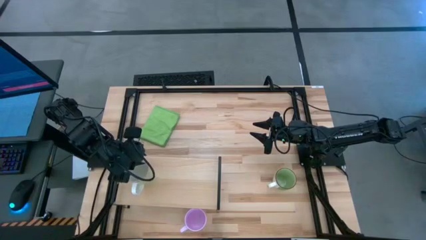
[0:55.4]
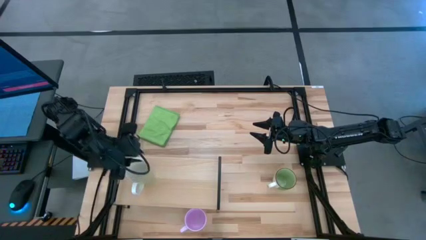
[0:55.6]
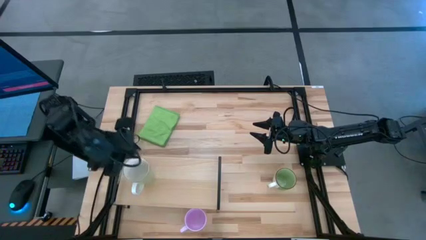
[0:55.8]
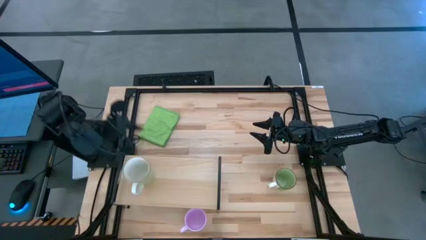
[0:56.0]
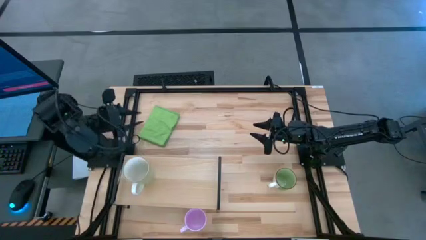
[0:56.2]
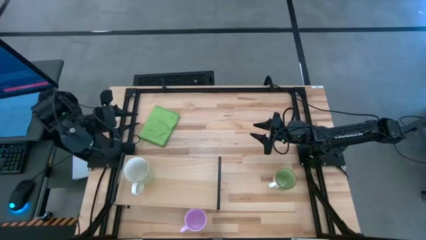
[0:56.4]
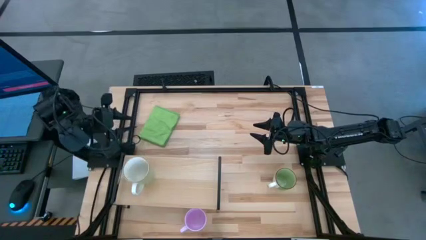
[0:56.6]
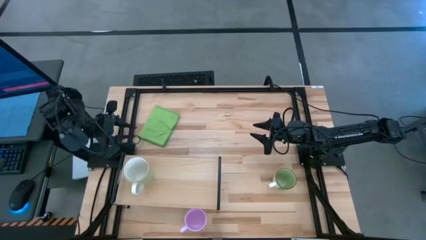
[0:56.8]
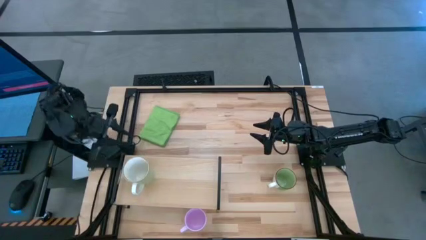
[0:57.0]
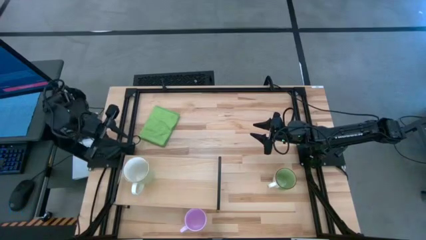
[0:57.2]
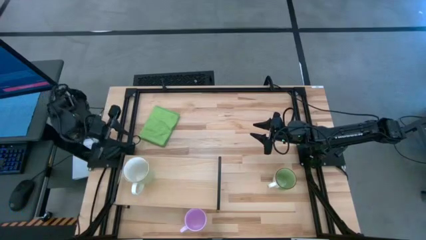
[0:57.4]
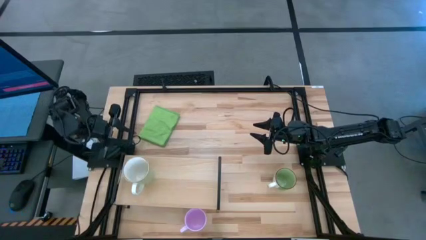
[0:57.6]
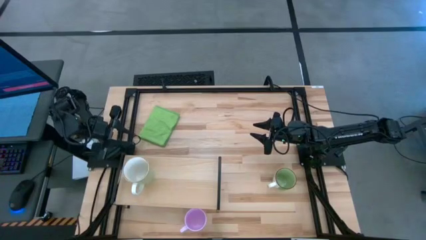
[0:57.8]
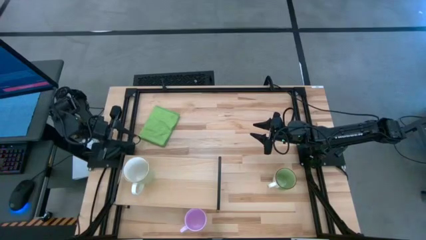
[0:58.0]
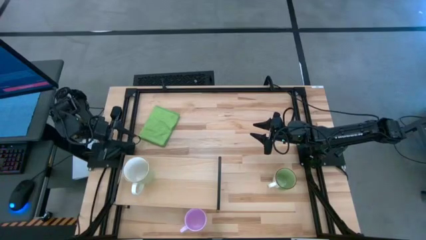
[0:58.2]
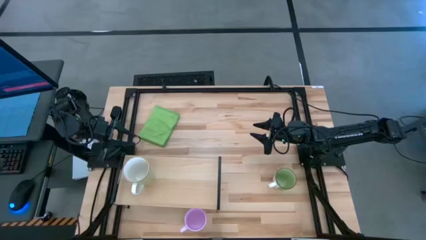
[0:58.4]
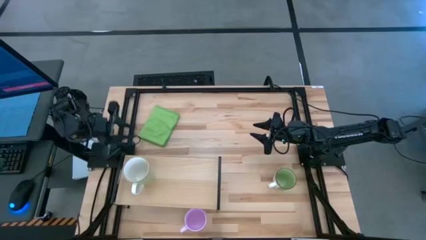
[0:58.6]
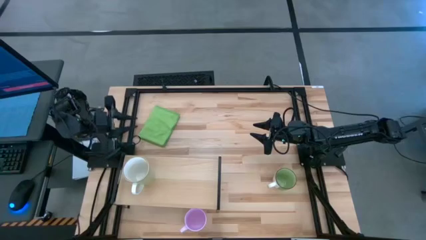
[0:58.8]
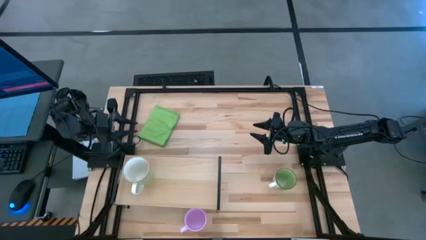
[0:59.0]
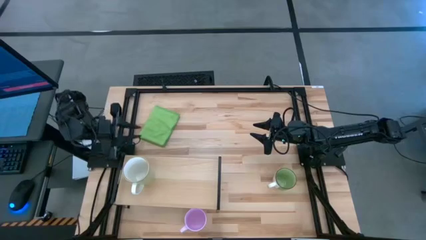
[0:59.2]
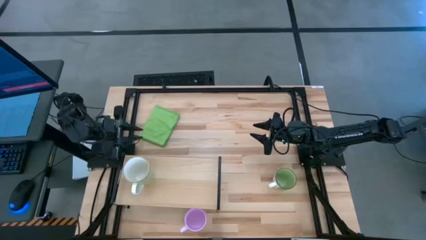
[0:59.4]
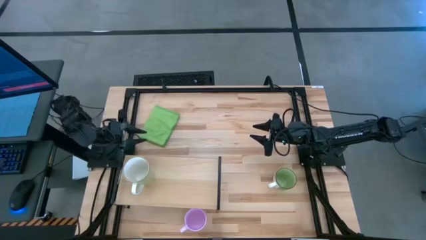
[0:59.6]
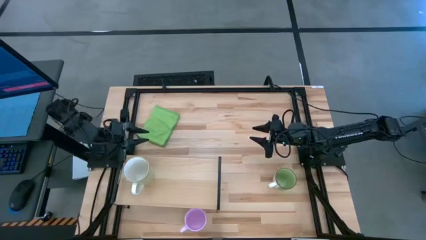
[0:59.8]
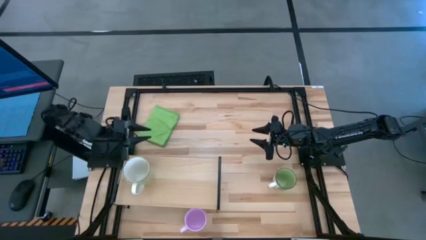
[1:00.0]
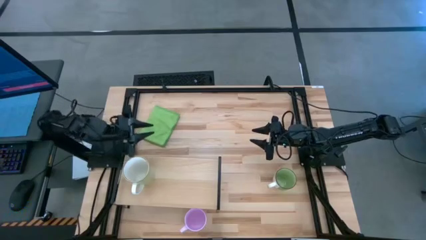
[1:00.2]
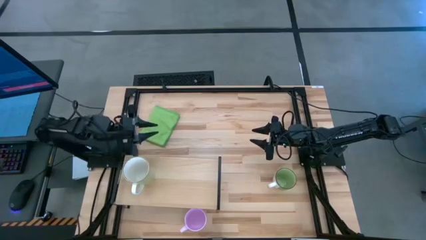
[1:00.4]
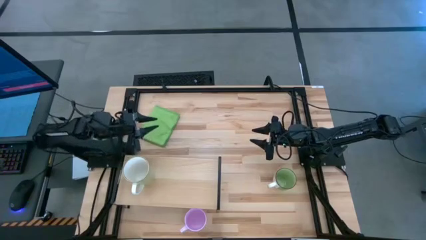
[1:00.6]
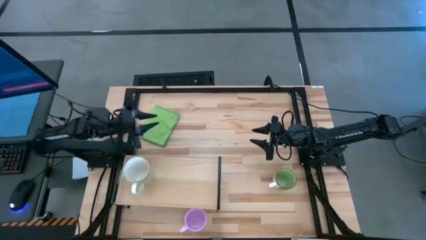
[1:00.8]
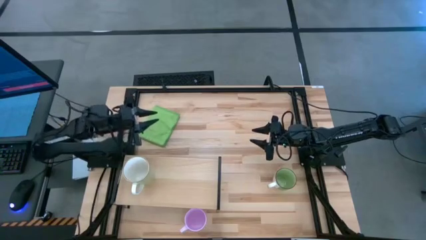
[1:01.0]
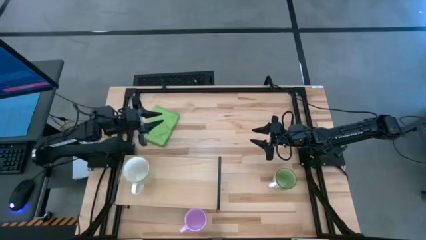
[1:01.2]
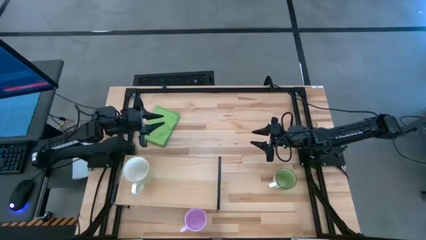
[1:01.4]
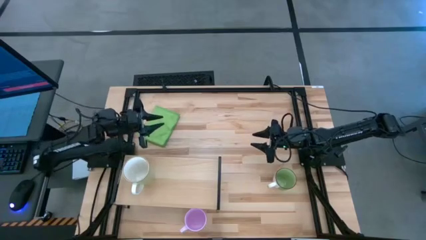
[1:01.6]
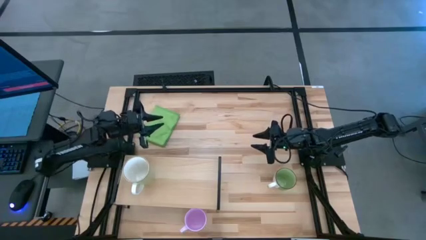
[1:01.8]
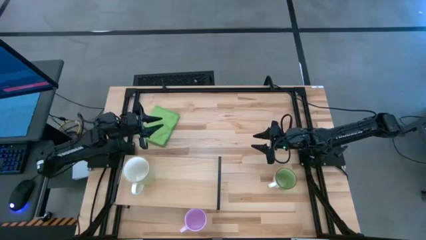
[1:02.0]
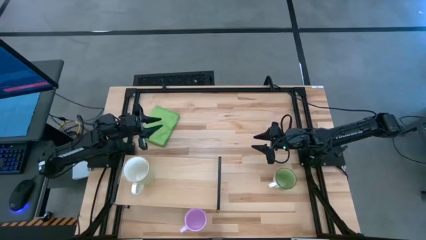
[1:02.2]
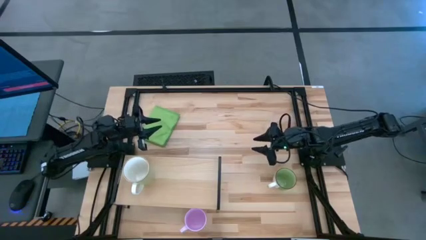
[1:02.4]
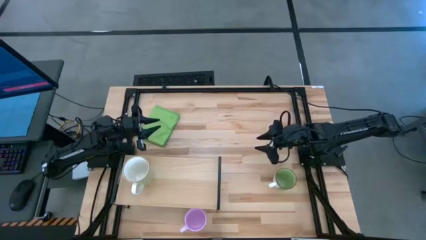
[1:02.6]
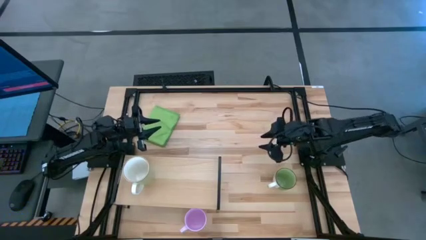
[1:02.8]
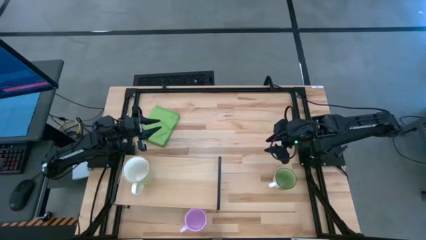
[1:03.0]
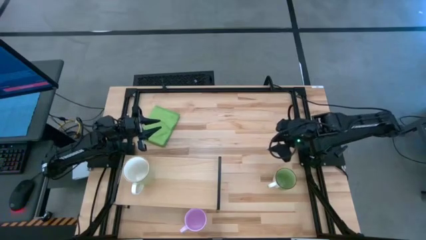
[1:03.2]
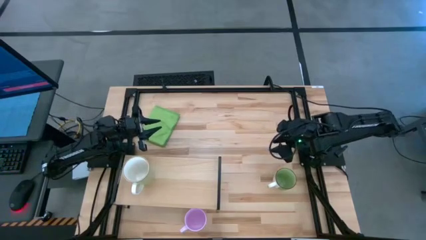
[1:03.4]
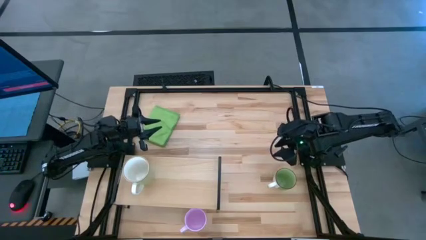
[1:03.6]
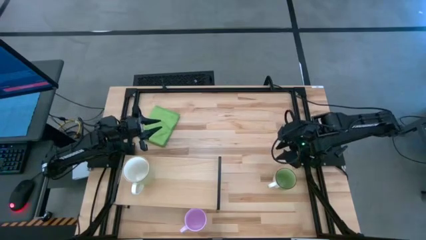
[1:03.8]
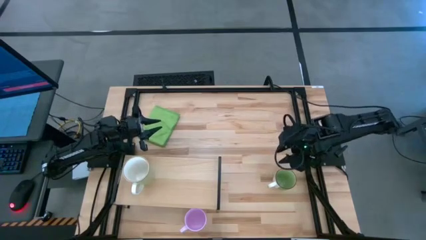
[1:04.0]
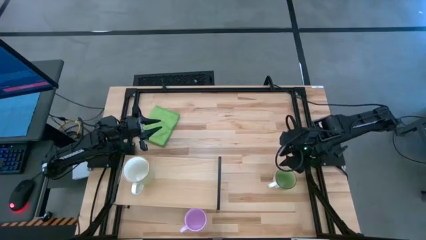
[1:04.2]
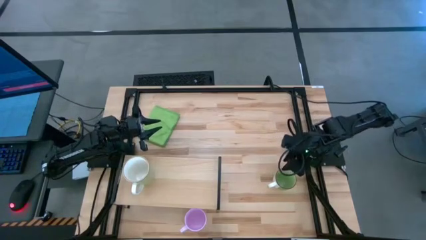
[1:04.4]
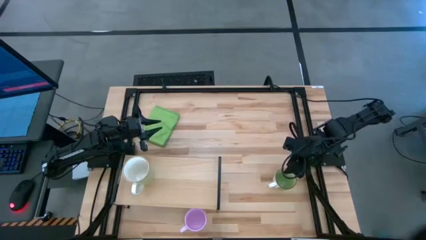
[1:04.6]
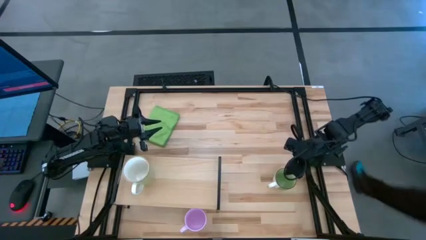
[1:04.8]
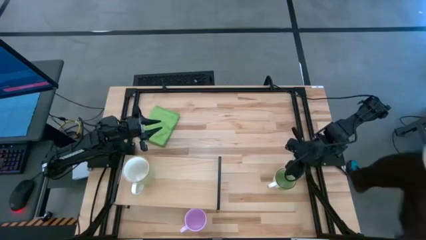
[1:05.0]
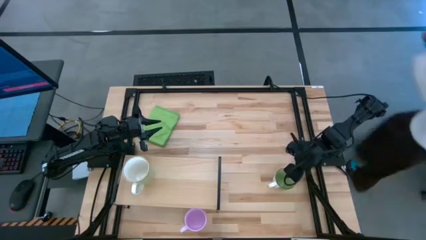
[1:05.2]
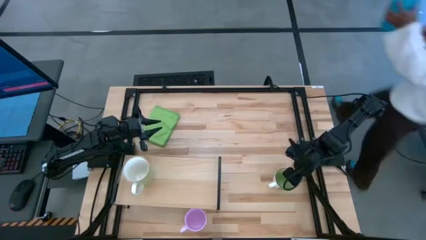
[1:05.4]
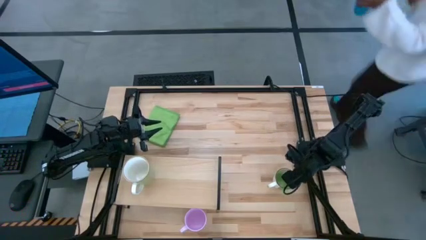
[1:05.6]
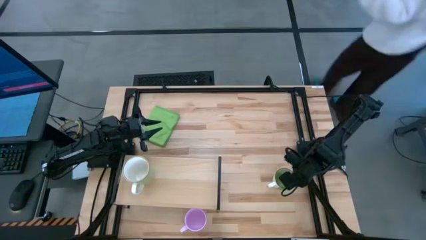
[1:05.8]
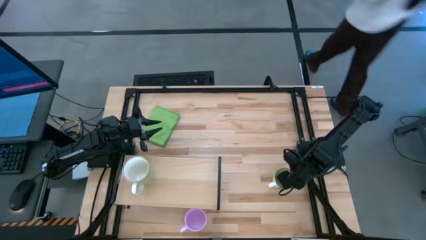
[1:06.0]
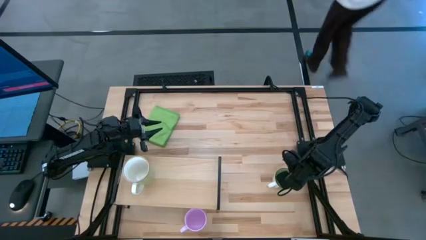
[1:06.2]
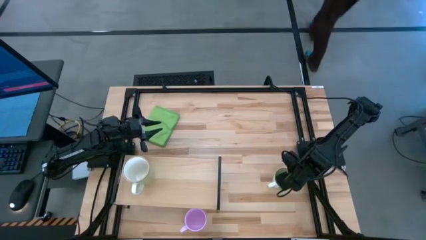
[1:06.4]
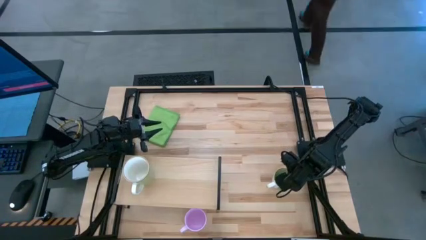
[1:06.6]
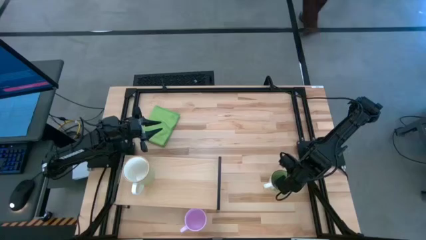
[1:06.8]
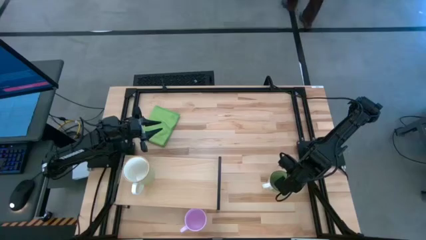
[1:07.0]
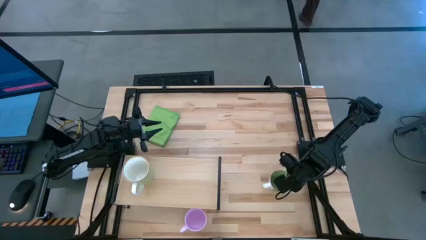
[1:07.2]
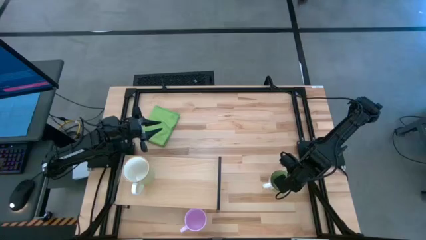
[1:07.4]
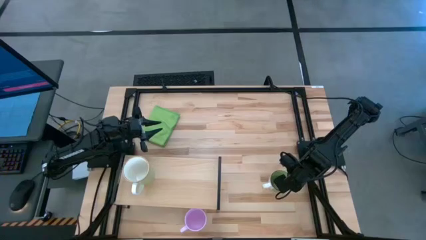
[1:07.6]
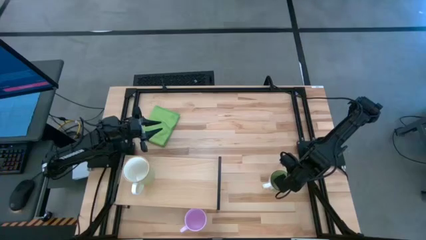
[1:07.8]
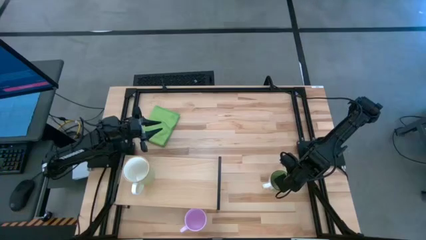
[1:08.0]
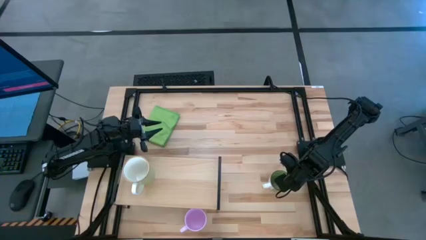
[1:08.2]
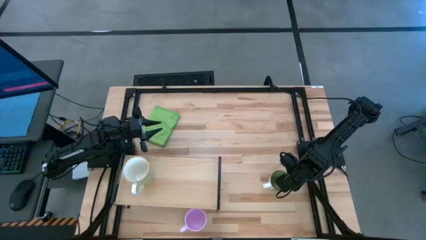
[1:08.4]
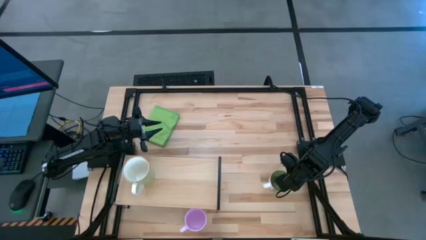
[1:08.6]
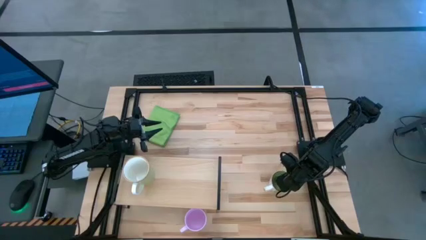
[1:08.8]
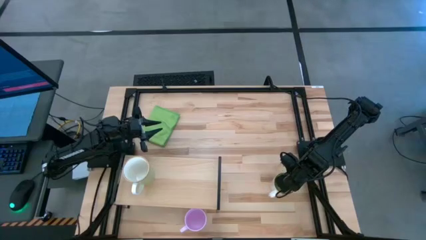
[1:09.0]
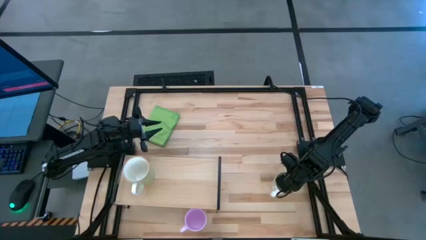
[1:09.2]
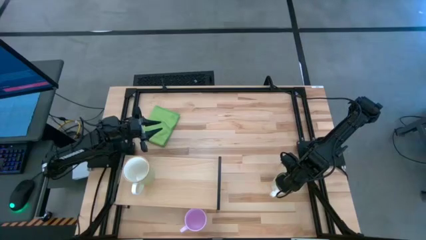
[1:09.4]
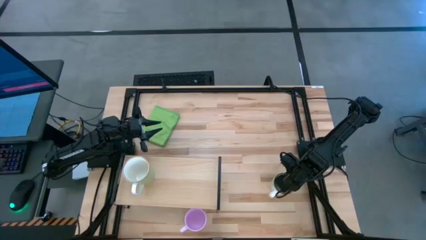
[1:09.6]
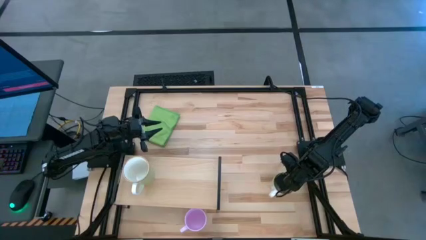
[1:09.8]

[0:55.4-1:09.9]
Task: Stack small to large cups/mugs on shelf
Put the green mug on the shelf

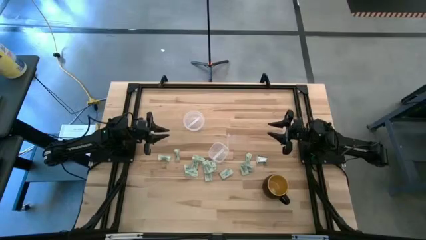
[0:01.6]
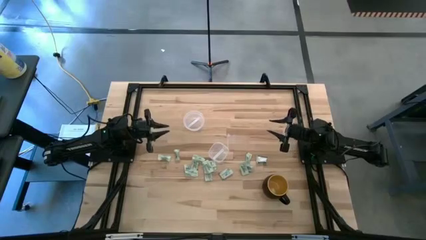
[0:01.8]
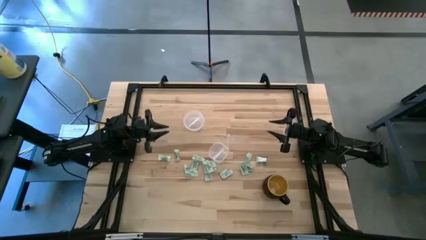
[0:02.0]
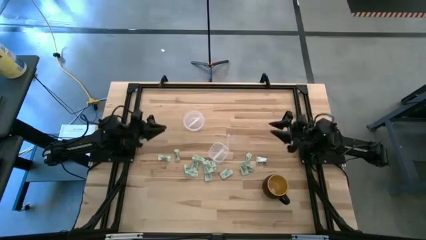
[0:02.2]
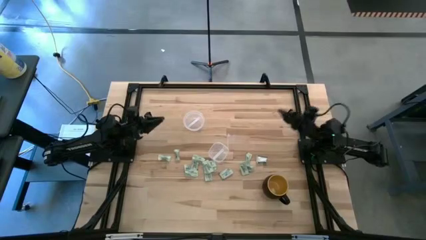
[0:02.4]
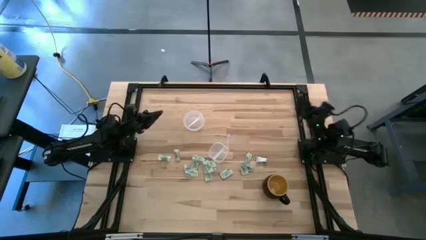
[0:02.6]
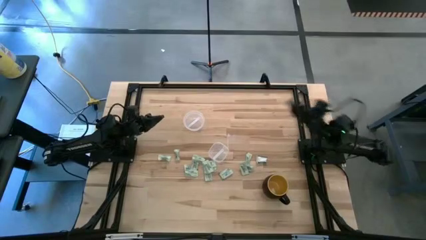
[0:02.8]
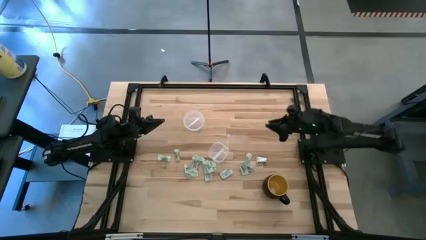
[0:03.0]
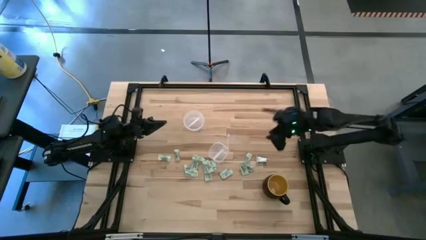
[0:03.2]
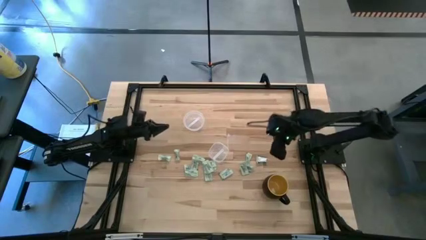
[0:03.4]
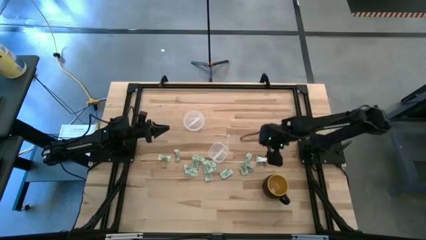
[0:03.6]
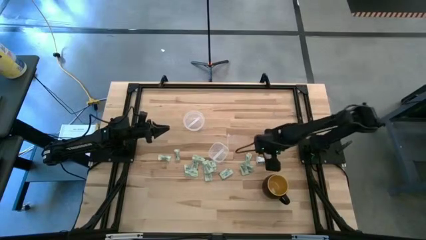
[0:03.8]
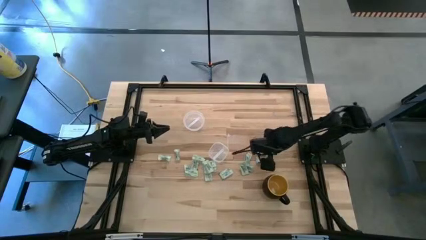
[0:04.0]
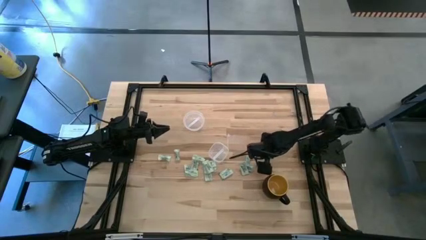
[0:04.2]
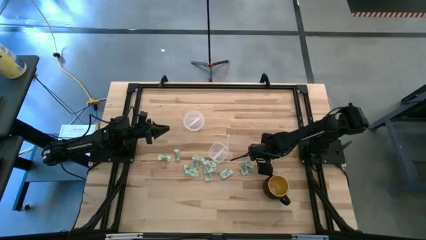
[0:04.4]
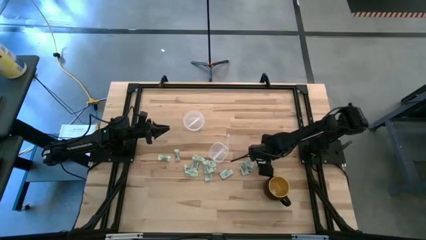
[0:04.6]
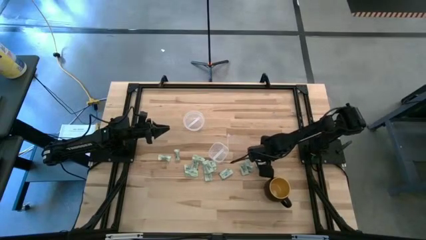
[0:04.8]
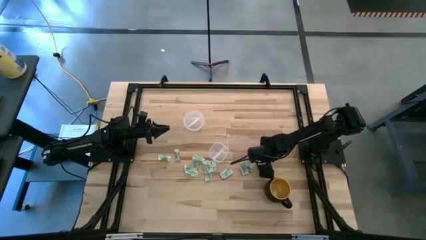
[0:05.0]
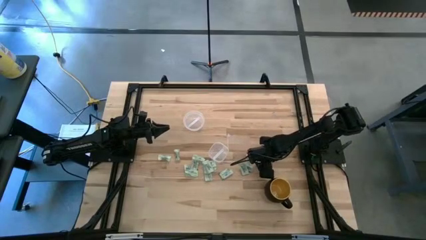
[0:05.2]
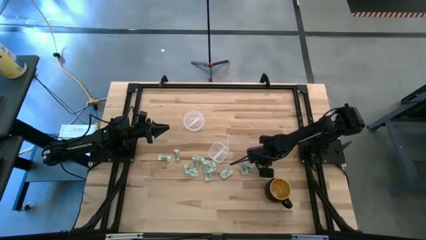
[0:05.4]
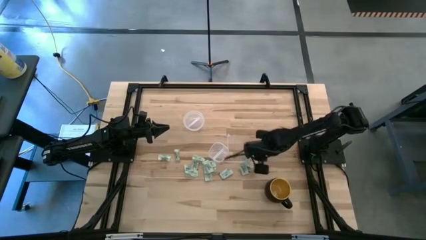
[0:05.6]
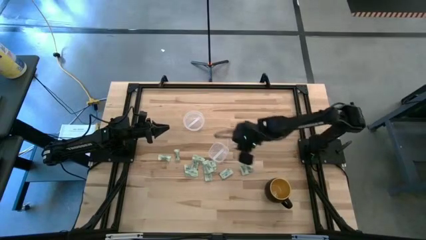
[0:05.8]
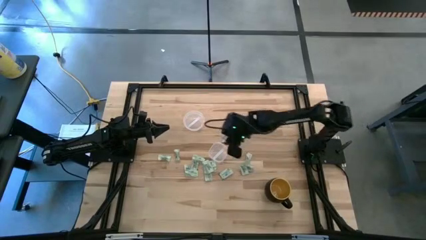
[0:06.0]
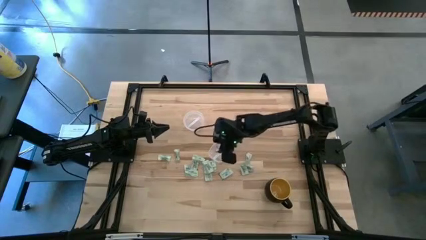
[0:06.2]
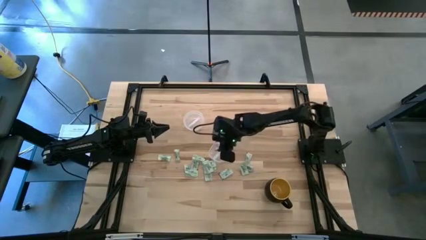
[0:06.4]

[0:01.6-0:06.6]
Task: Pick and place items into bin
Put the light green stevia packet into the transparent bin
